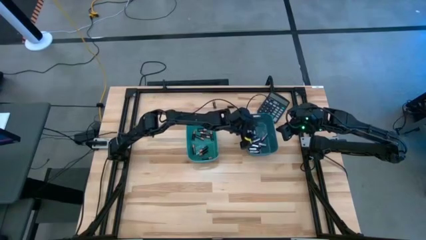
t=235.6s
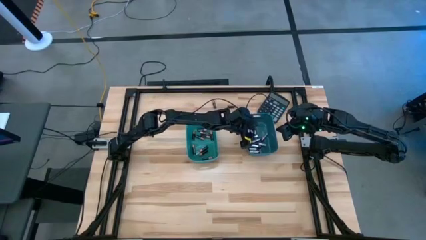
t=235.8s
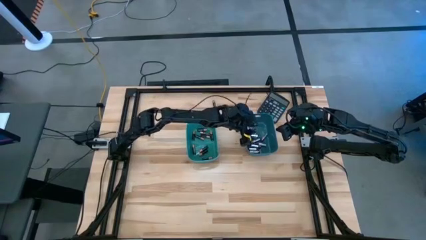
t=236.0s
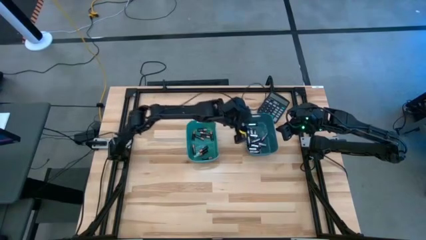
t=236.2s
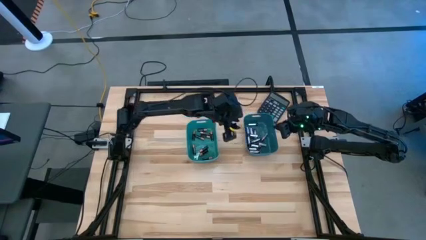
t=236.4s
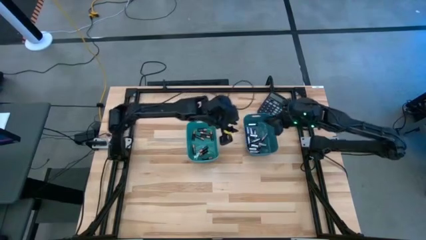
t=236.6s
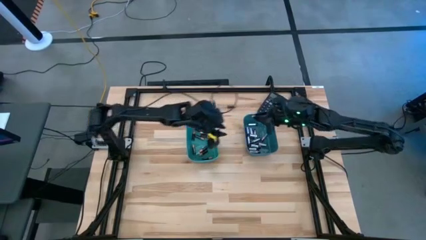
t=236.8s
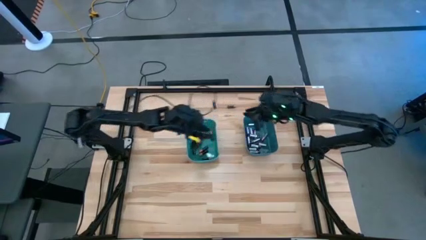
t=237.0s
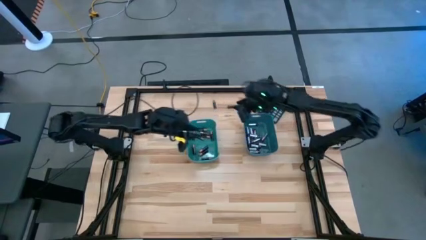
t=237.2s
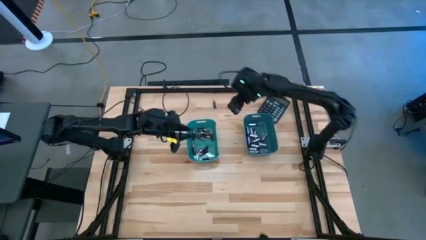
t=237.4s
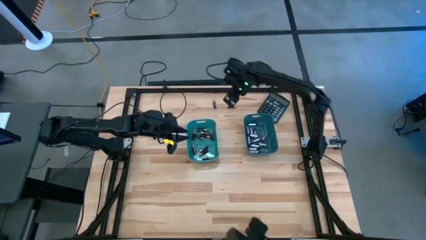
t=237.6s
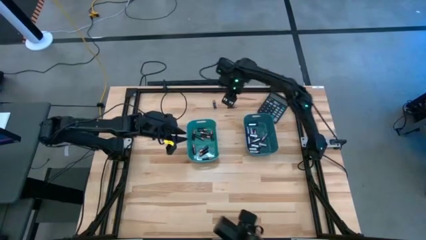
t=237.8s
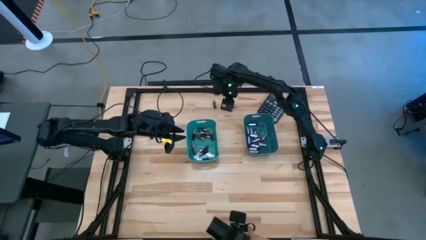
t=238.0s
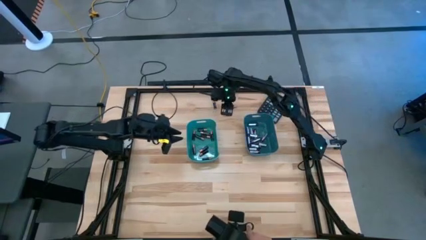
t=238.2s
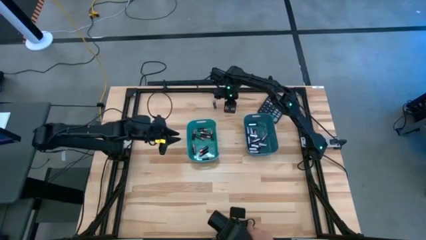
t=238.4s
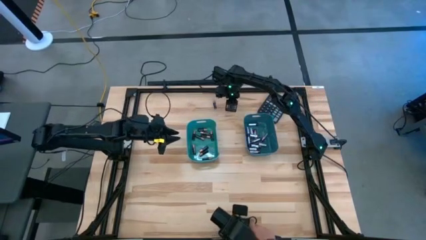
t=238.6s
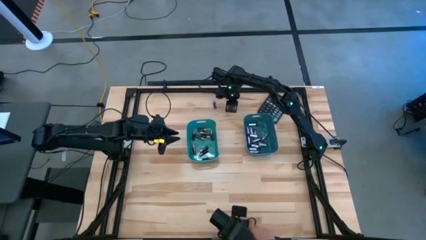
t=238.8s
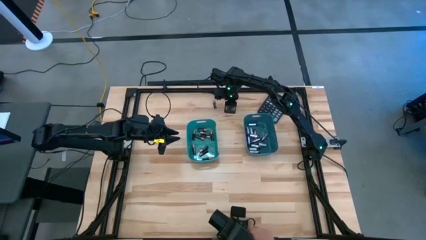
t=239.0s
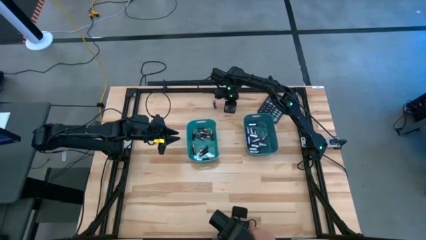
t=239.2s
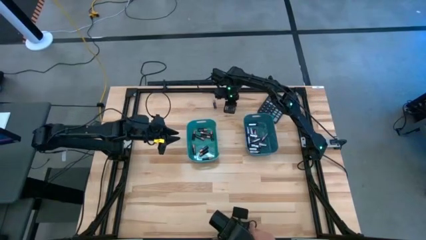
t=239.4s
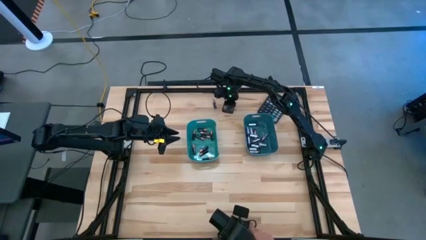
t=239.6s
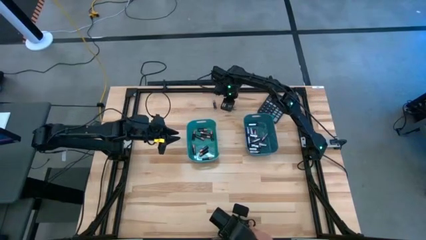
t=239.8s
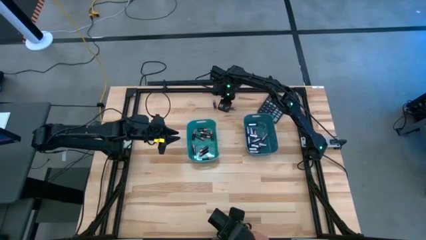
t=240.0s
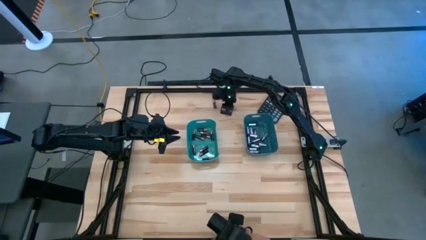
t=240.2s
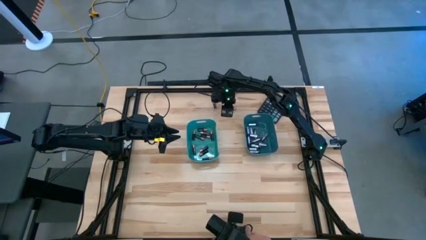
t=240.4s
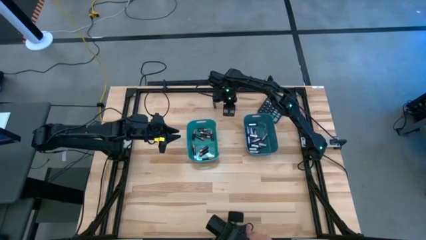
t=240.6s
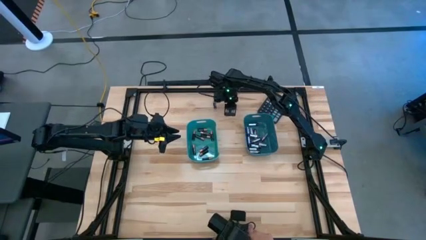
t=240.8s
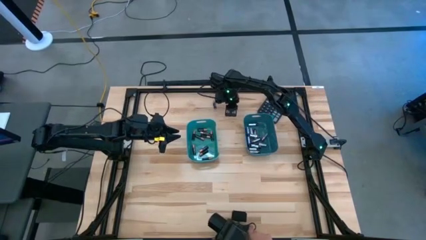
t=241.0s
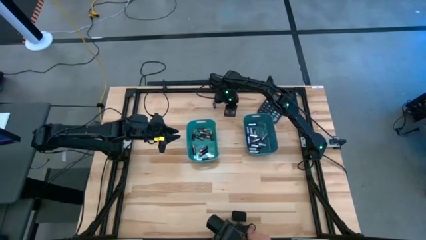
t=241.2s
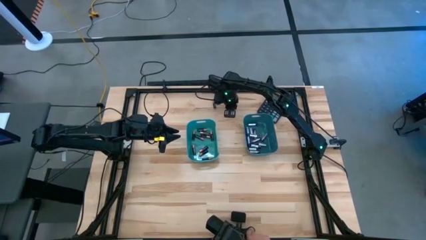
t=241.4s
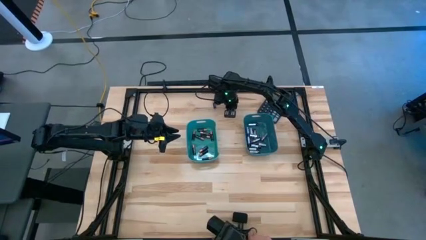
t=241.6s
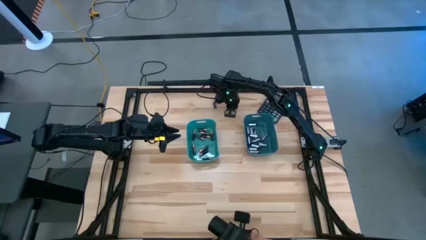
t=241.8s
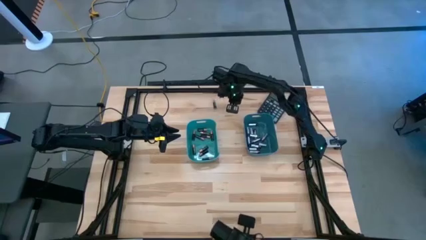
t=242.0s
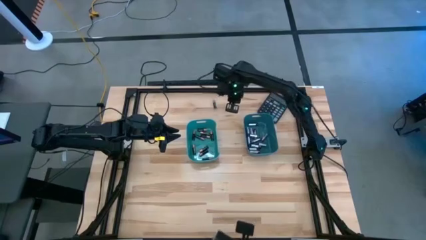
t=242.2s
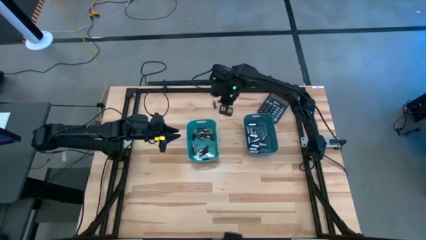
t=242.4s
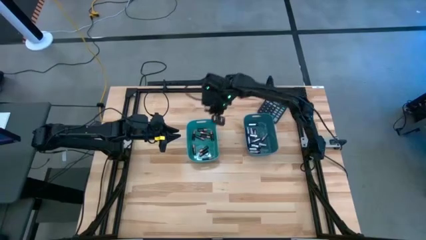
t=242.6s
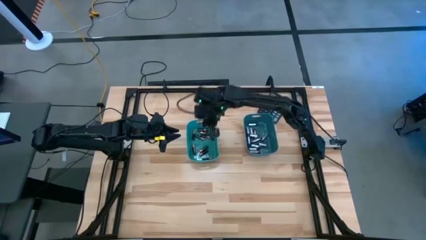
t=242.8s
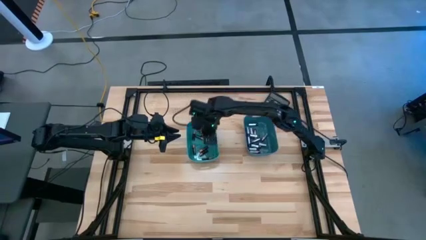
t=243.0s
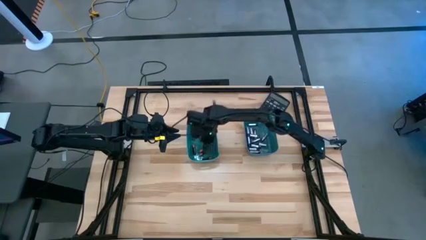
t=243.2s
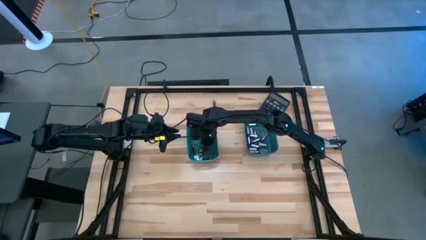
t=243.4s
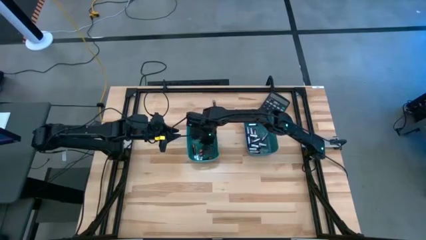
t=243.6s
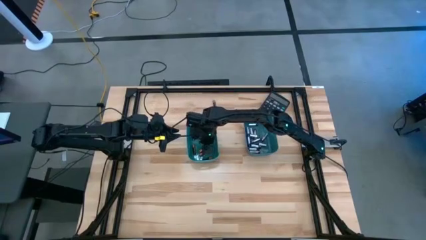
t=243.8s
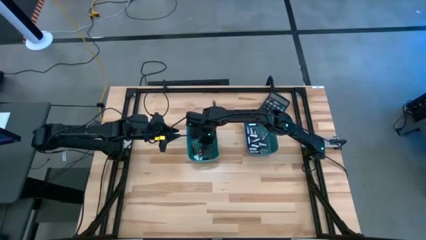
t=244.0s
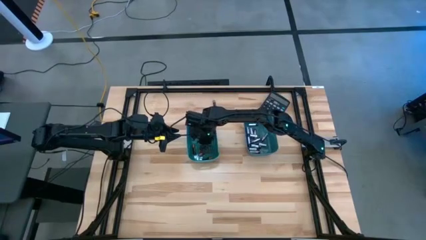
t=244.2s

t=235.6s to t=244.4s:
Task: Sort batteries
Put the black battery into the green bin

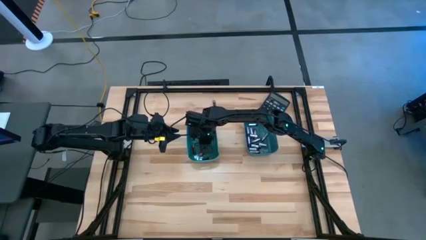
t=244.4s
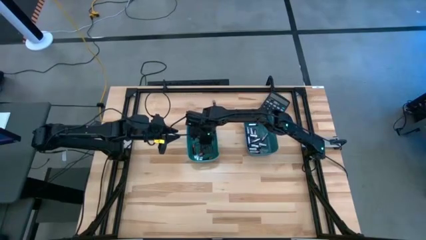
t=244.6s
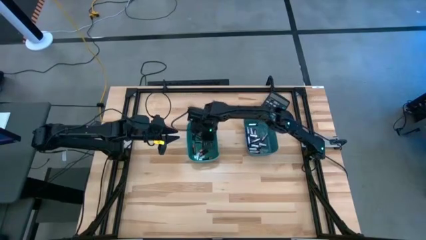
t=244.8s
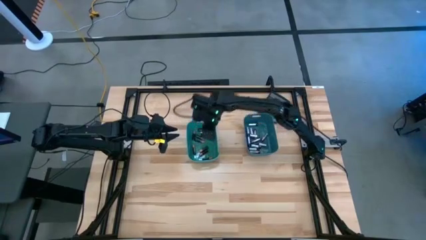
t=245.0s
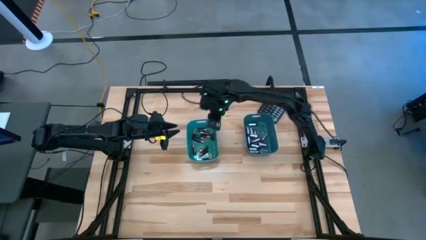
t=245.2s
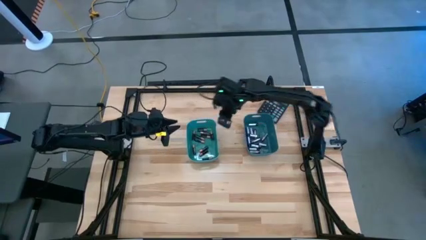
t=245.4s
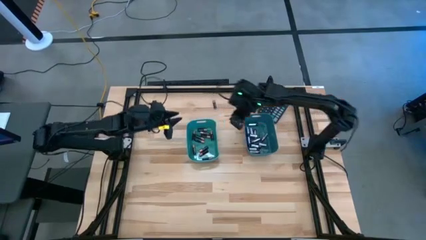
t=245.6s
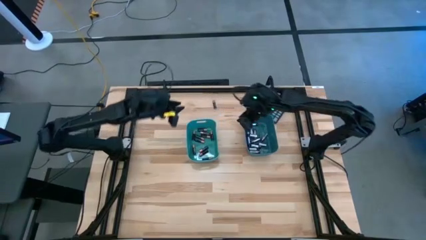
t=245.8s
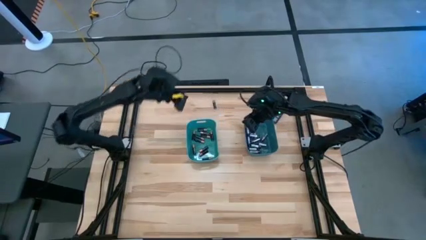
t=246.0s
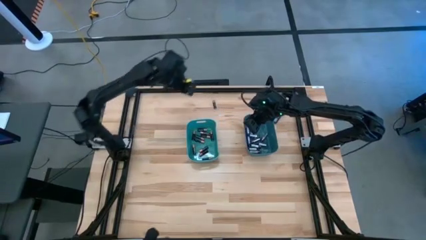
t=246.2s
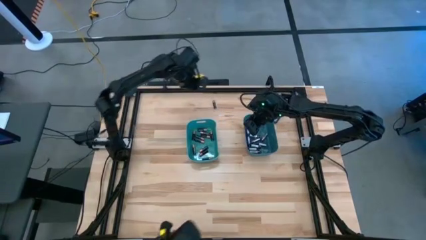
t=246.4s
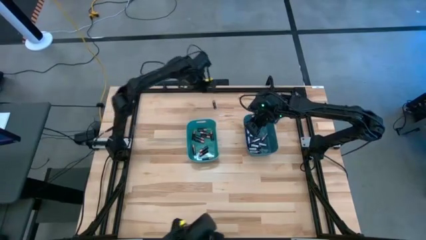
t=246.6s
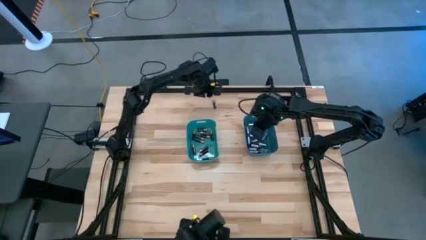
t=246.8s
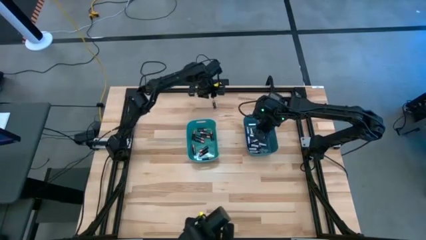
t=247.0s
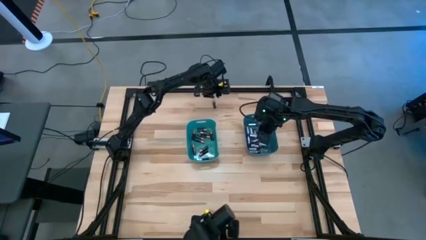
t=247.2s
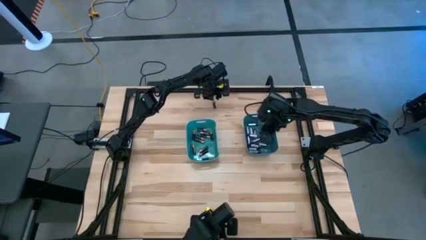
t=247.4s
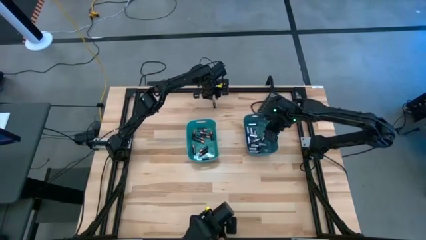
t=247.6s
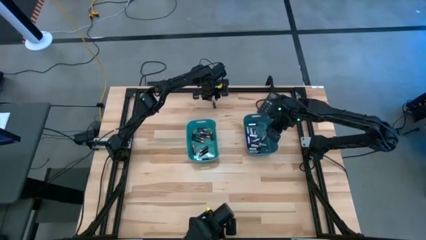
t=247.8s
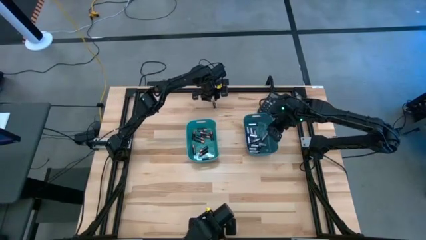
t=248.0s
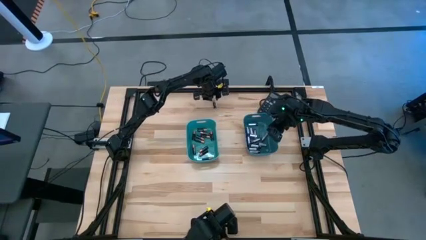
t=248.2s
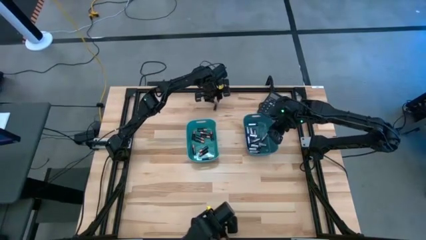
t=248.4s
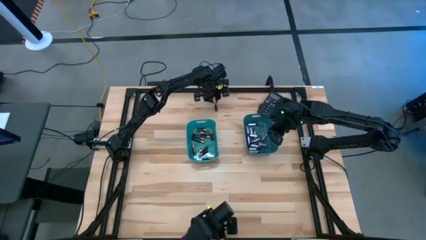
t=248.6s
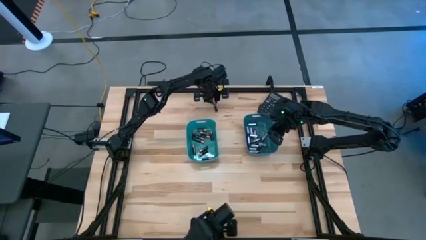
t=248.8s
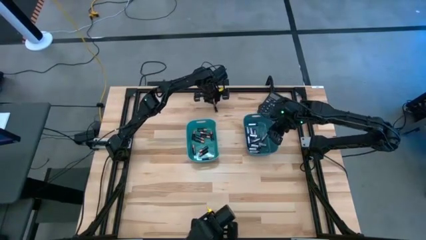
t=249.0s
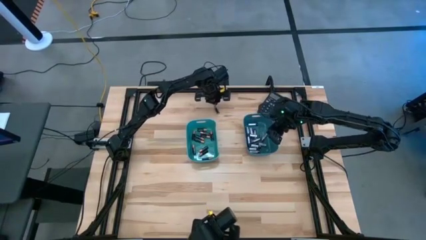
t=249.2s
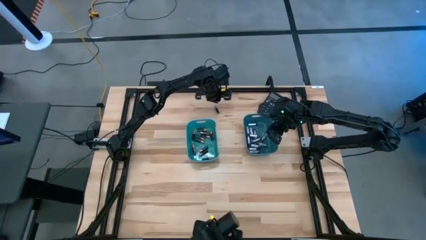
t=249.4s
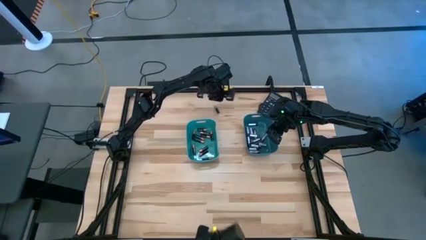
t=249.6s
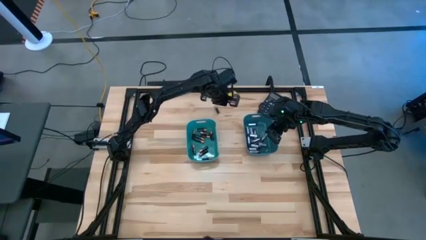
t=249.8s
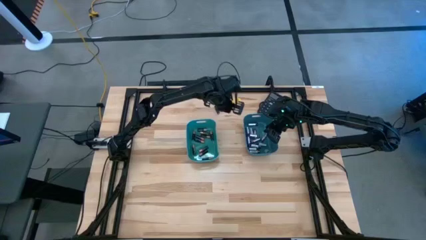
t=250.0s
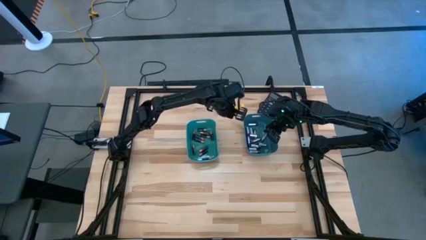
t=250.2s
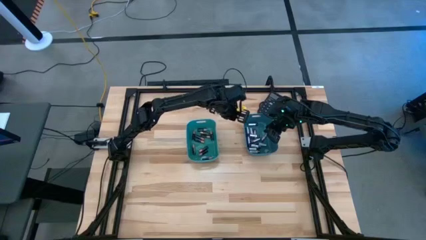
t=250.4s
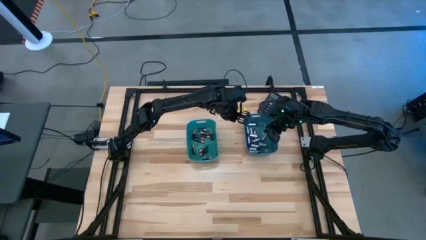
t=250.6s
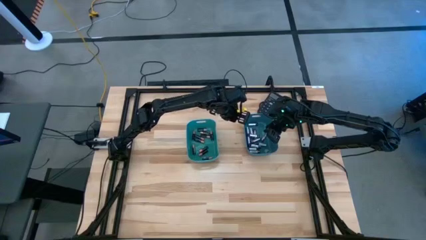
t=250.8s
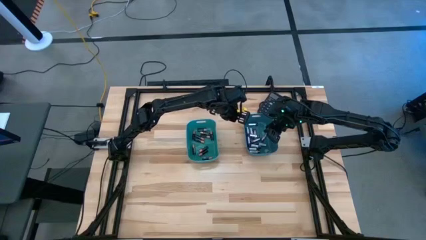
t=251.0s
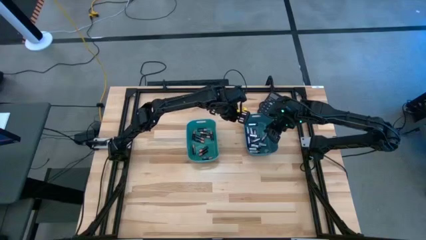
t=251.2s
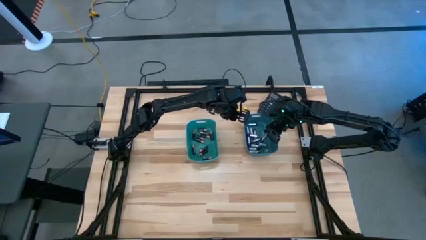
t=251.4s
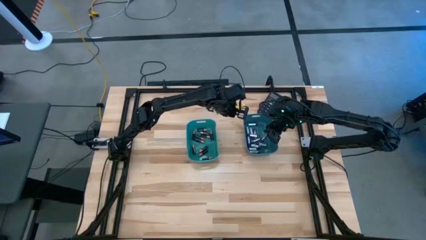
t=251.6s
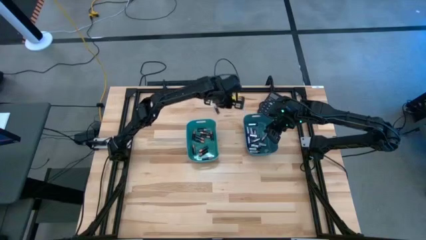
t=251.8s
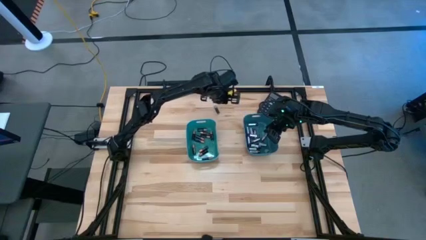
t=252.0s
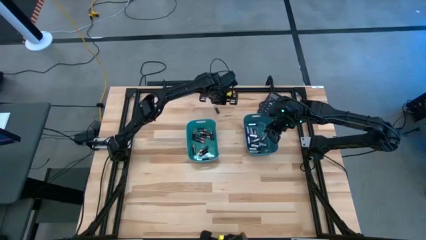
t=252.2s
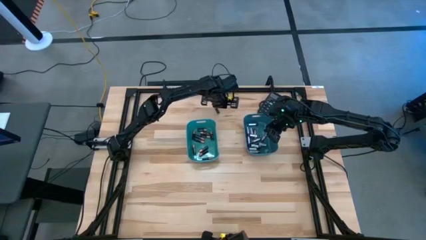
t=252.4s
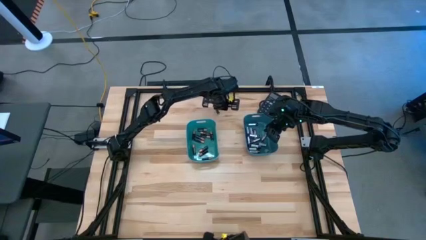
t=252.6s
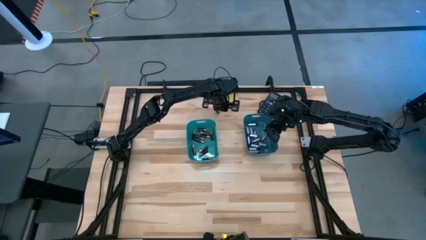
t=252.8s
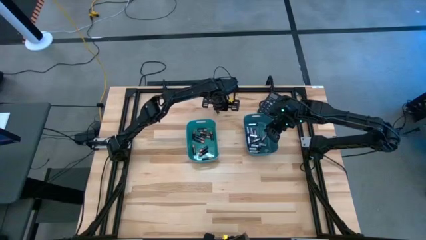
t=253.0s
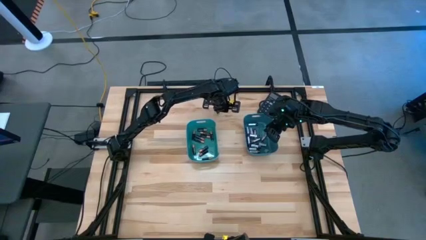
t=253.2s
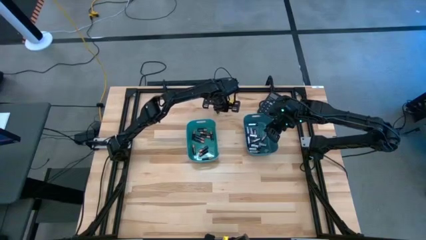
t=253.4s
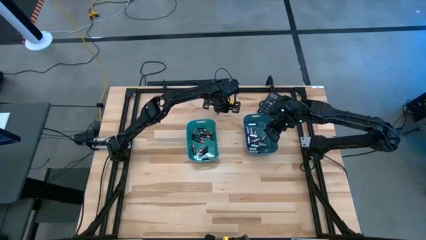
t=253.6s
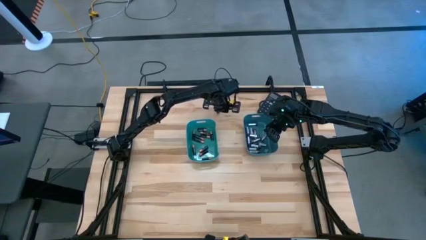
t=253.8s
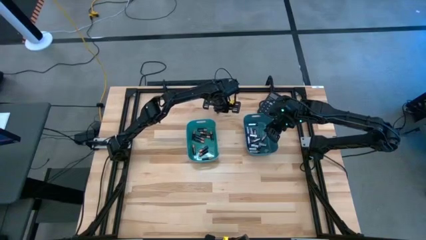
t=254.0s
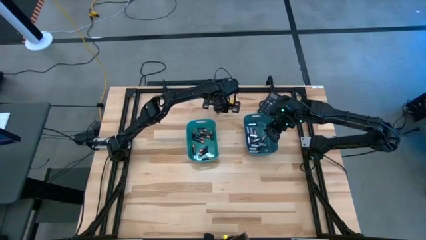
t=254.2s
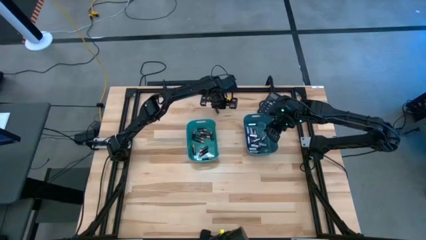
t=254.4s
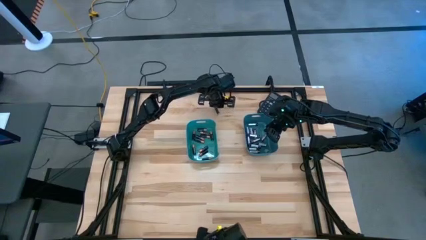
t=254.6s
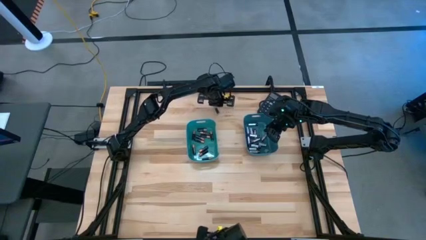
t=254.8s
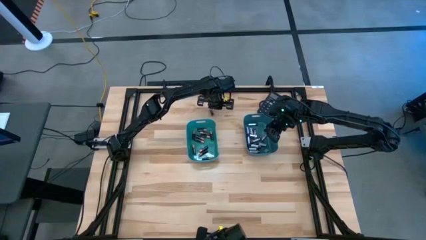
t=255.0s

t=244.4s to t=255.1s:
Put the black battery into the blue bin
